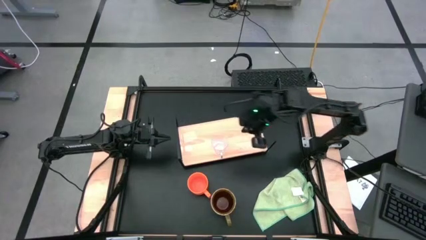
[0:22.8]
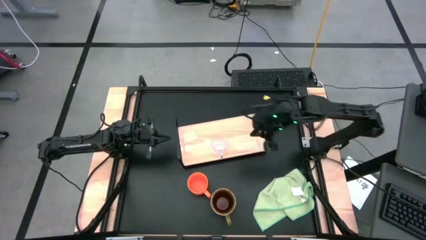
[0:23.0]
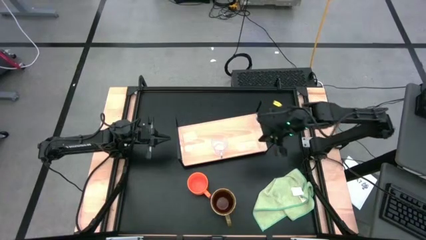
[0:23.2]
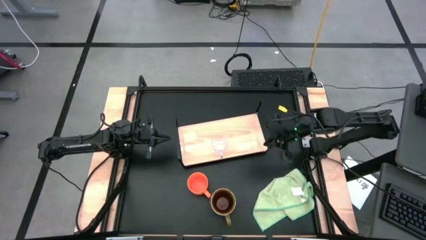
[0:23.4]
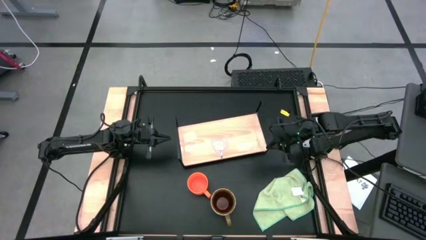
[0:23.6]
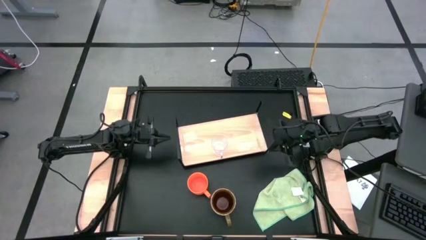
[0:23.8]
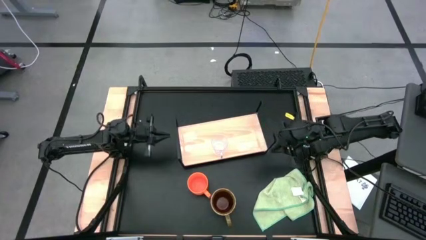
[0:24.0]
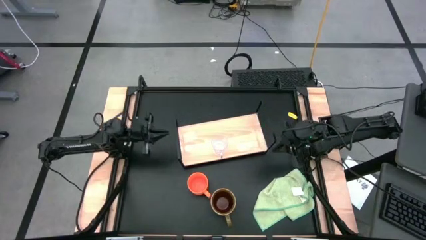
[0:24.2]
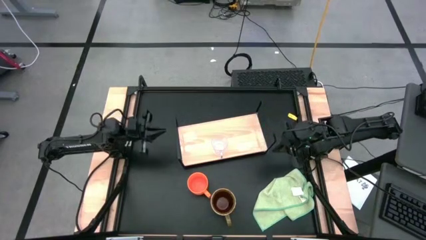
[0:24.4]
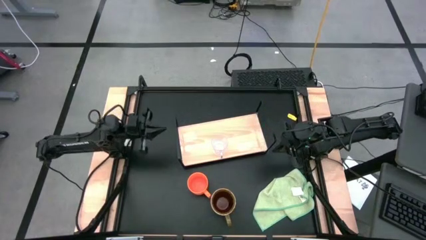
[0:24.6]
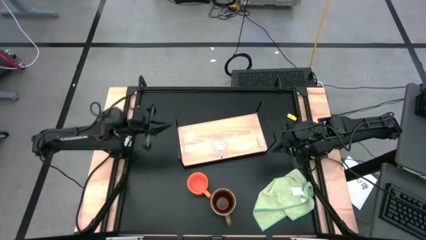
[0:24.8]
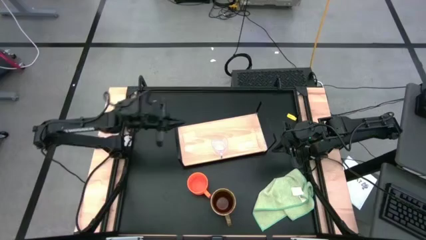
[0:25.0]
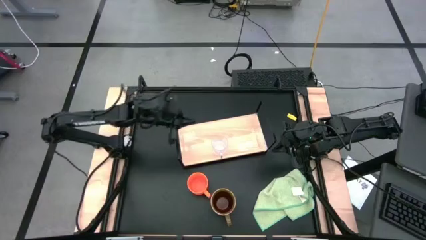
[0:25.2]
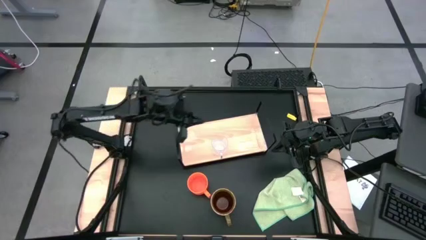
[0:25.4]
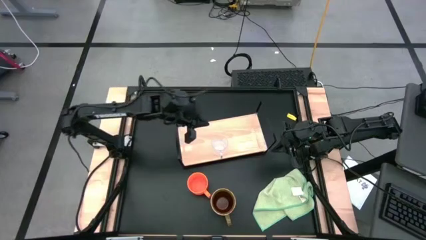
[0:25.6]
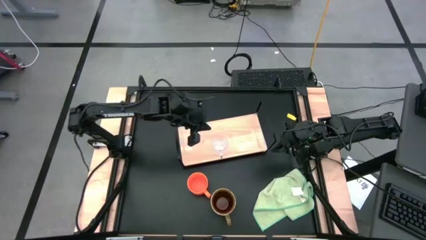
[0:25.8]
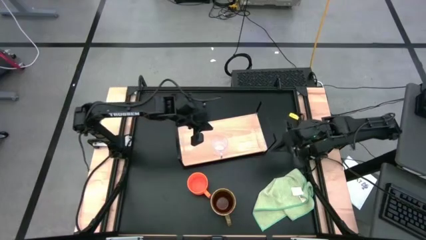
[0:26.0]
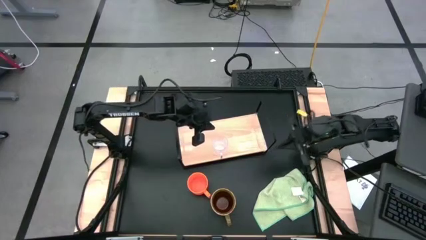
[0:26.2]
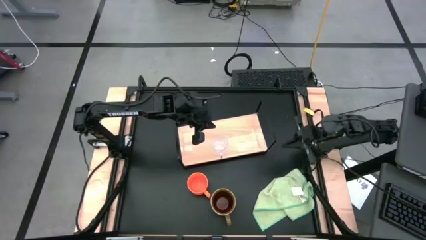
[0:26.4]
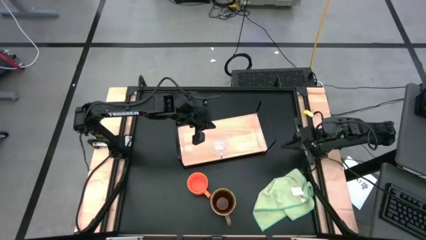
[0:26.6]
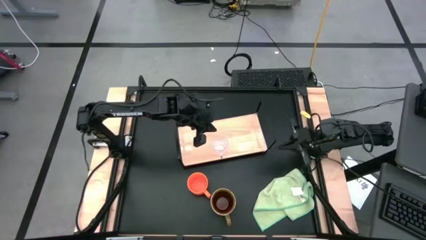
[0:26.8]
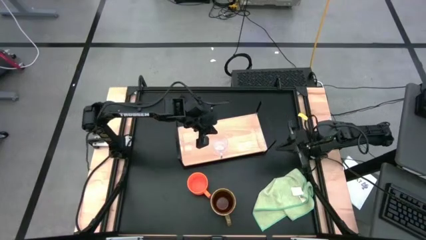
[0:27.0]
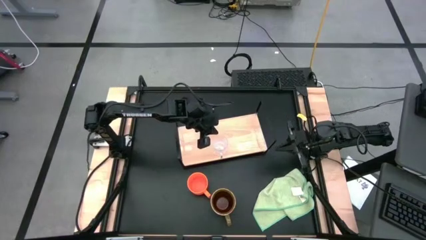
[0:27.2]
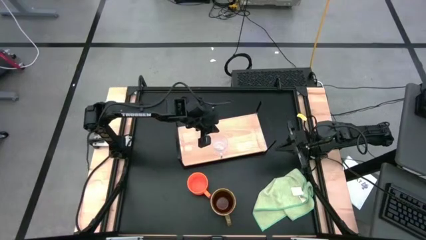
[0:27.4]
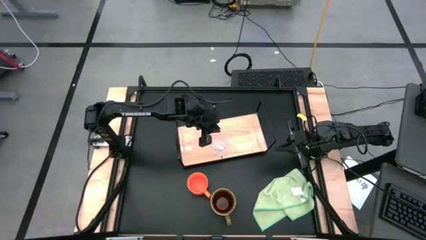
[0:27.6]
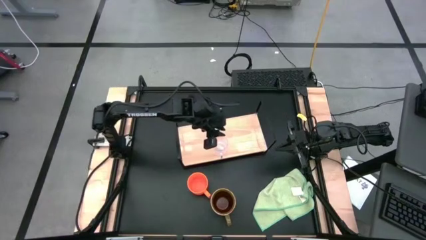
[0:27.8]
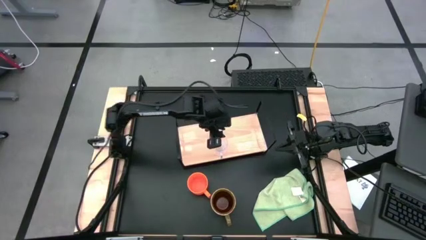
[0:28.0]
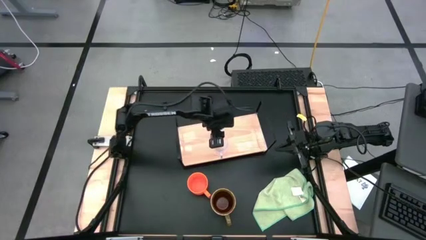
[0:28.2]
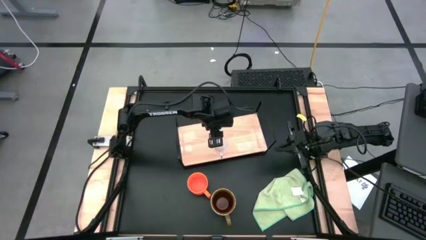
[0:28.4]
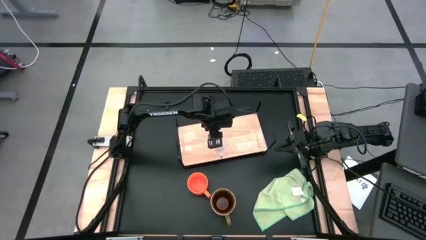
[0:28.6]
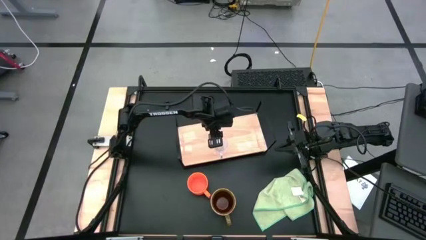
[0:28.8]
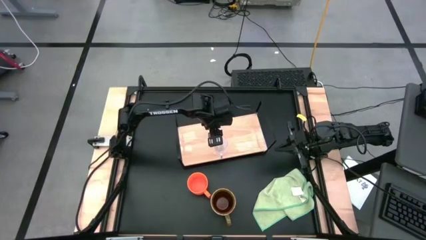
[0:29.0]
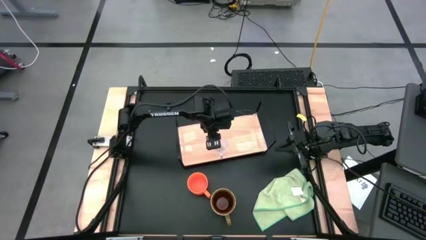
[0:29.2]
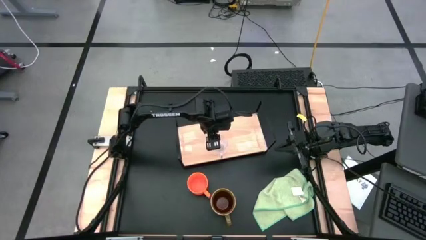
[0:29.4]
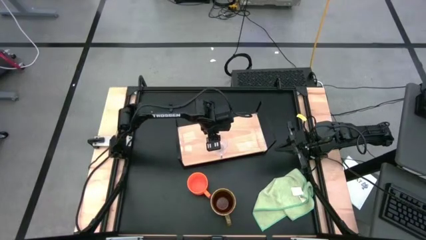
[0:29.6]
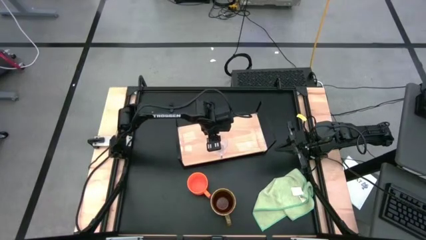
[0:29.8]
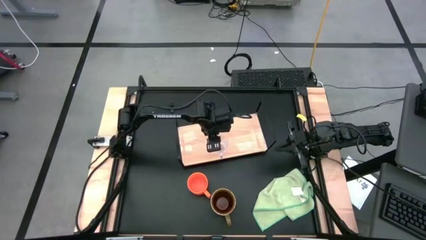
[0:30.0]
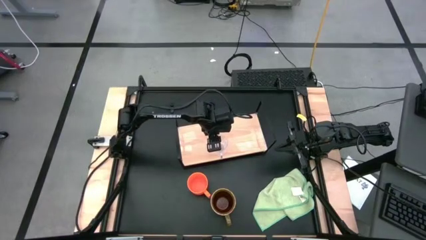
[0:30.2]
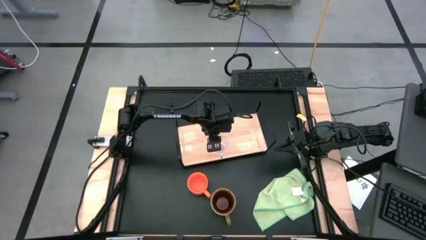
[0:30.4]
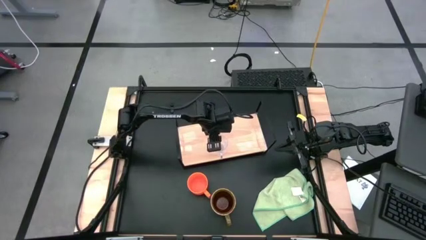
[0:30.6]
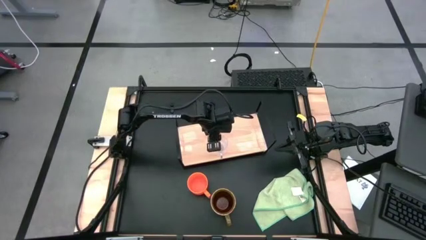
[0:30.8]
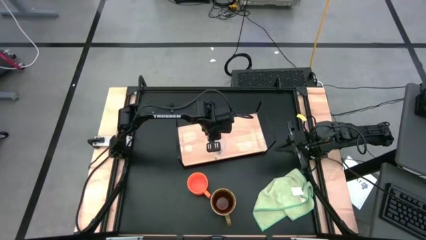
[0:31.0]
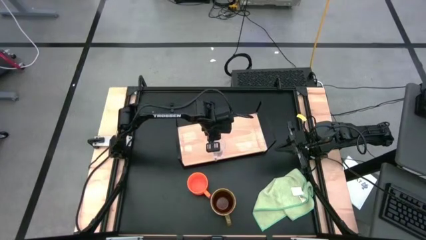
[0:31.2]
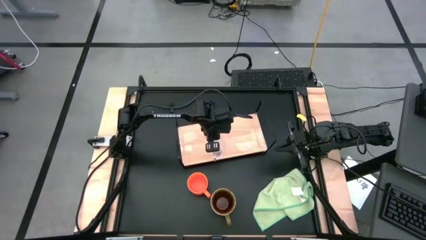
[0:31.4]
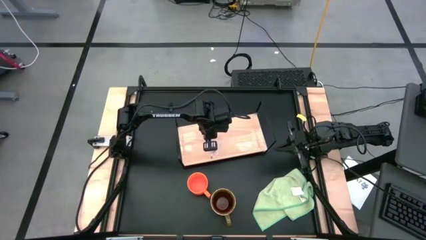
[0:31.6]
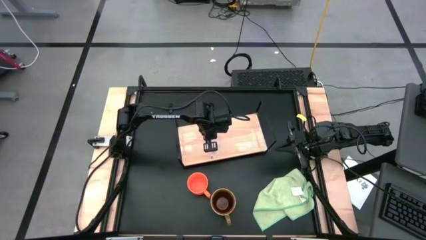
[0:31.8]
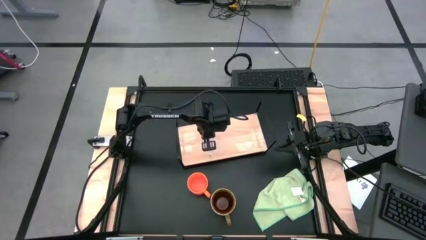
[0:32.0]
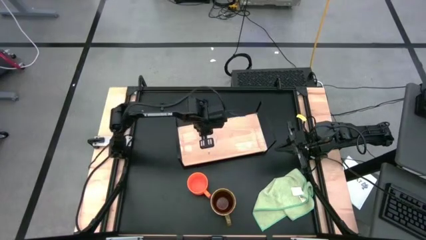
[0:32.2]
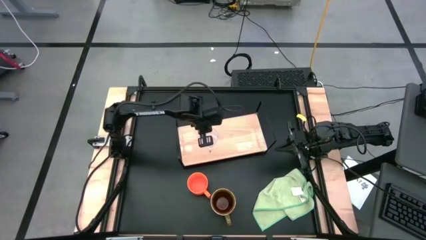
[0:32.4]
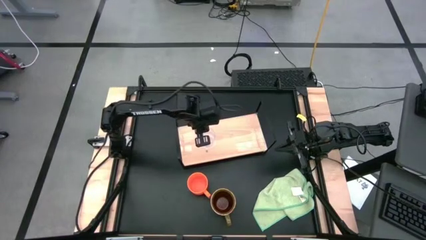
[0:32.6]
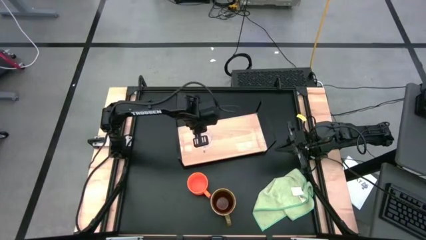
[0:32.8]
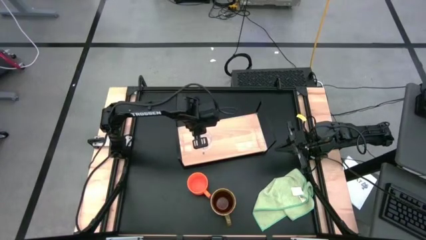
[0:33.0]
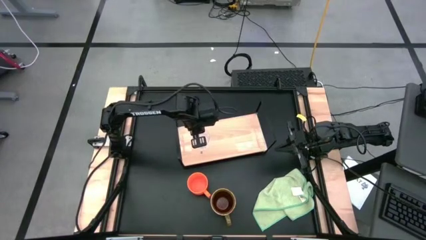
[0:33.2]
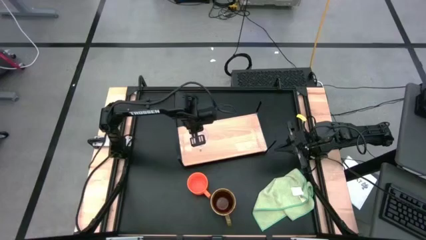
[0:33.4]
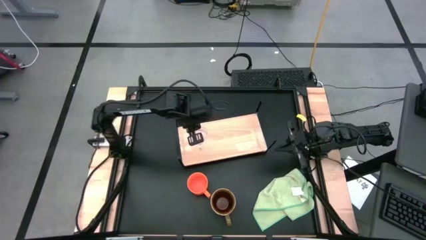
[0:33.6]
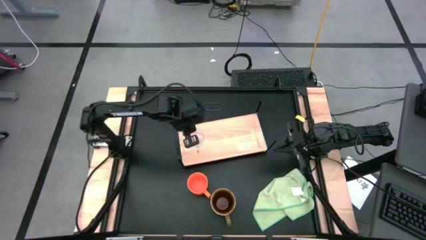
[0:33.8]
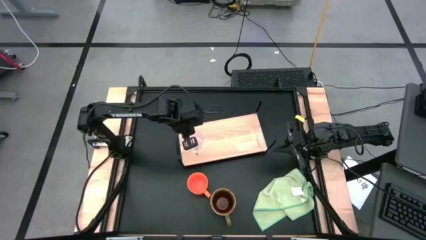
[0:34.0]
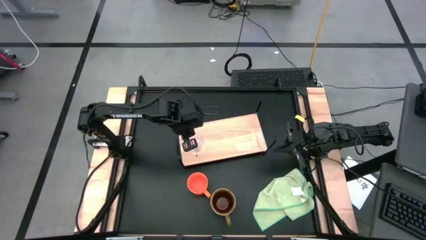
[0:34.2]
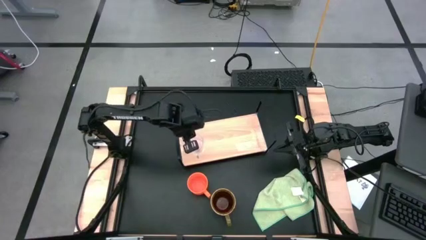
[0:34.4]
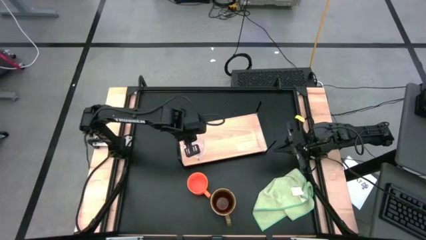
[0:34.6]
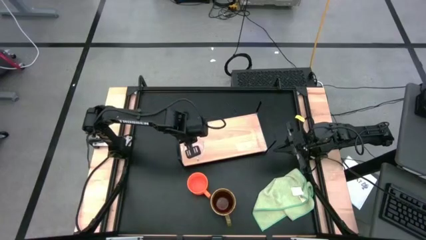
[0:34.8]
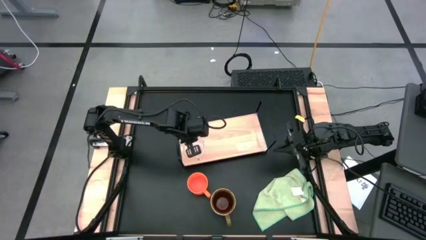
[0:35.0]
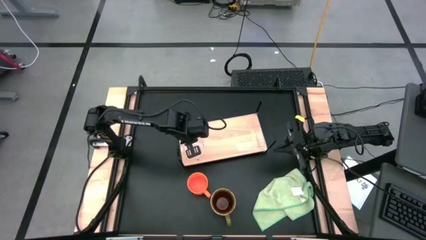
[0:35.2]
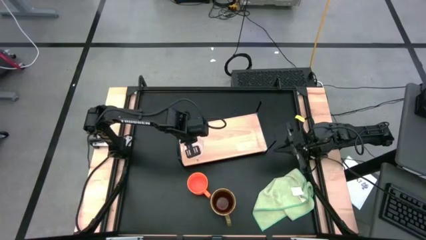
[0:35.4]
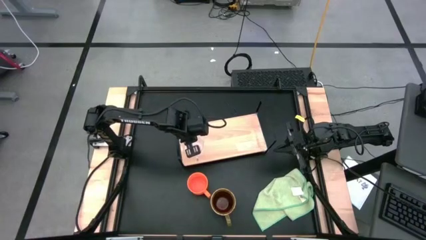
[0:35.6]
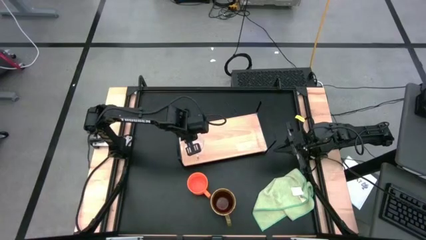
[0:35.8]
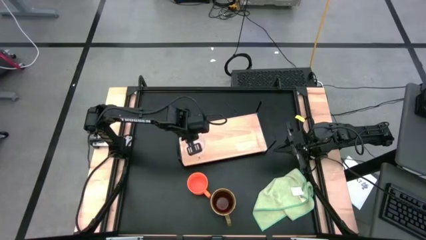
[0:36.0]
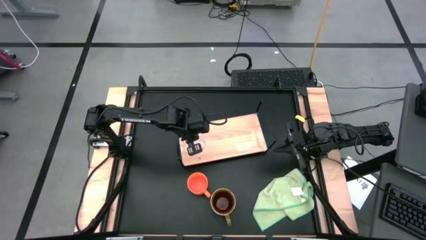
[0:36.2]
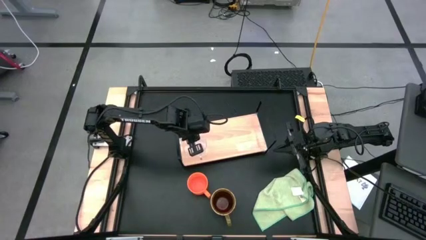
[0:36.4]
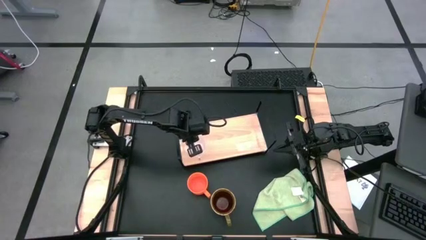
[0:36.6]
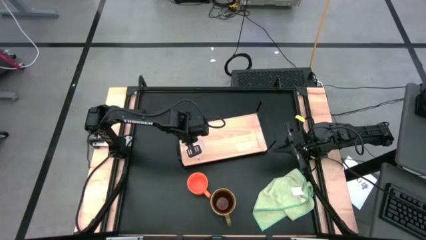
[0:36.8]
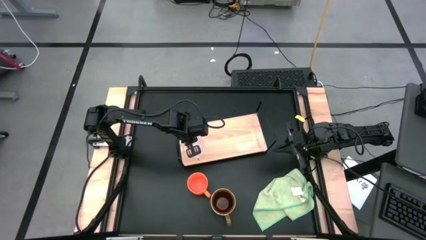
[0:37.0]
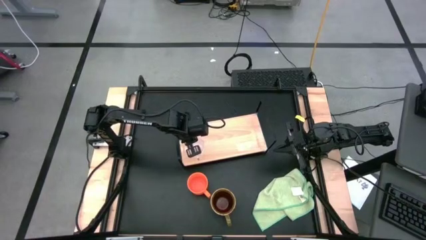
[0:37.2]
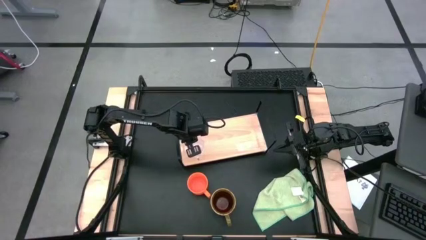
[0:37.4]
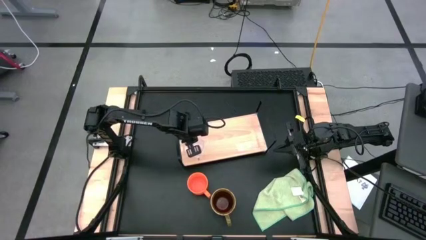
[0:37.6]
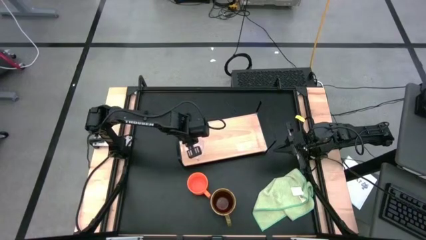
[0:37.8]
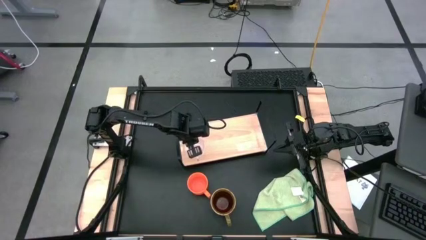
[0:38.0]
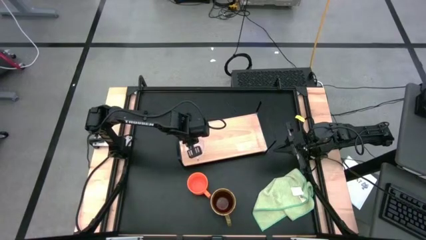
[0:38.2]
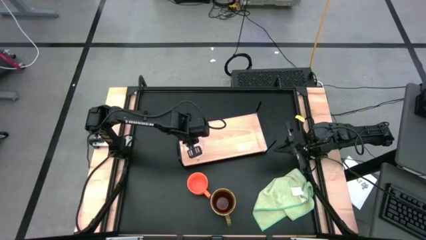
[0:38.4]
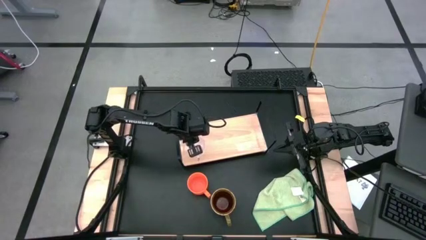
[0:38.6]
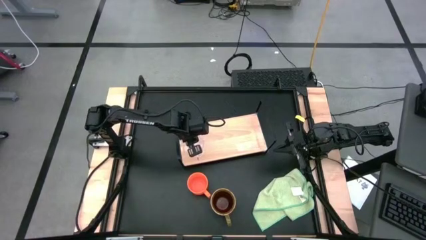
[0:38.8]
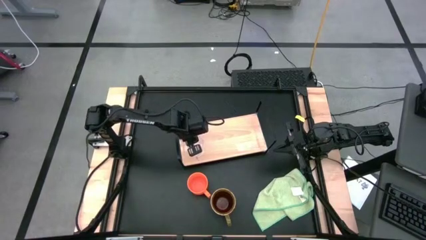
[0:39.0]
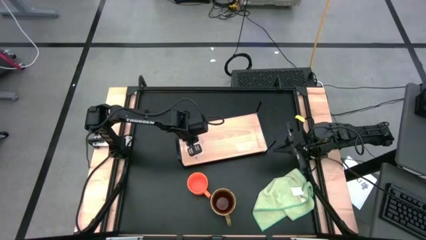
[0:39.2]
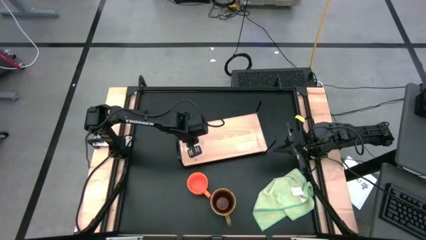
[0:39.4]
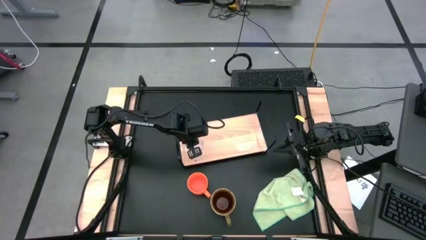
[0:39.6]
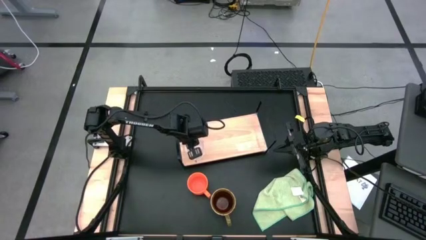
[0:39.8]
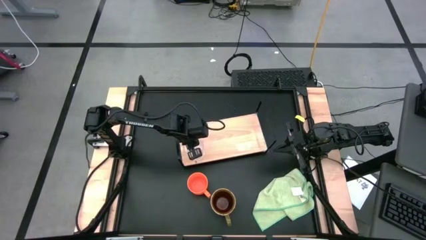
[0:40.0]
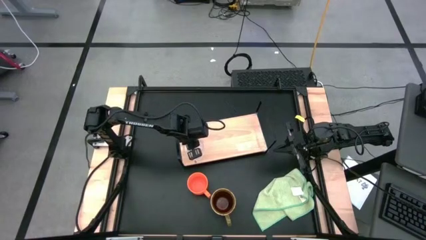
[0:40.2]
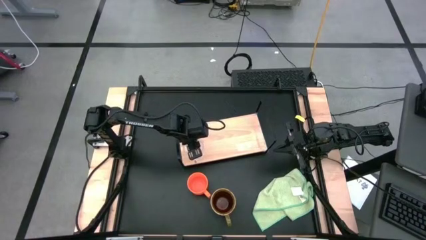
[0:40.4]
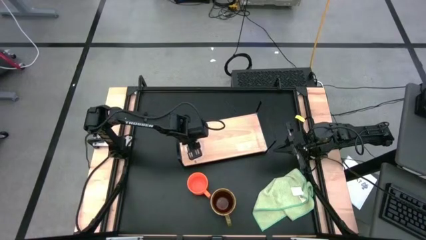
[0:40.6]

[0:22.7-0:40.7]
Task: Stack small to large cups/mugs on shelf
Put the transparent mug on the shelf
